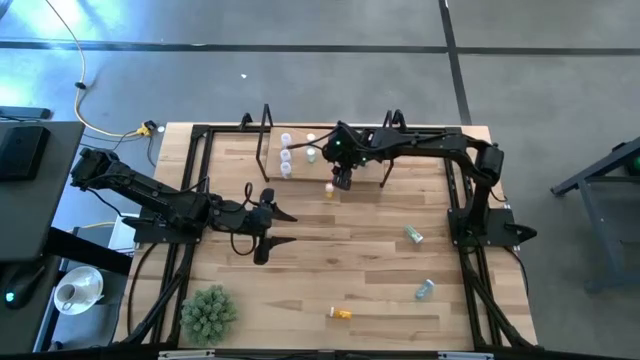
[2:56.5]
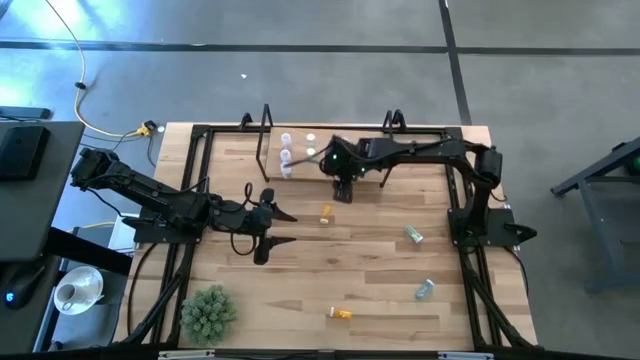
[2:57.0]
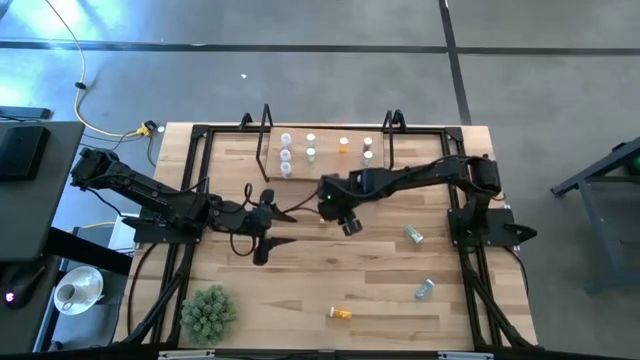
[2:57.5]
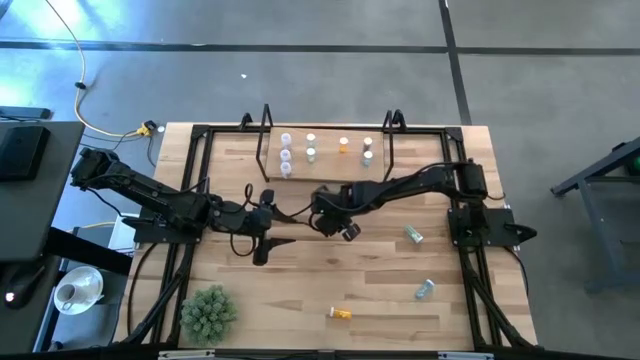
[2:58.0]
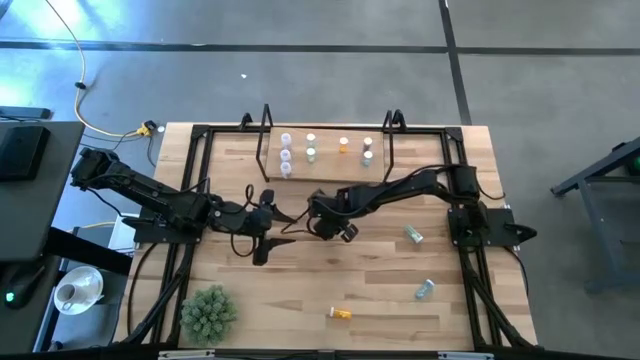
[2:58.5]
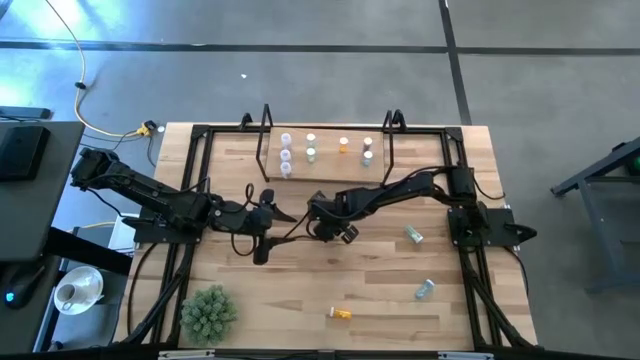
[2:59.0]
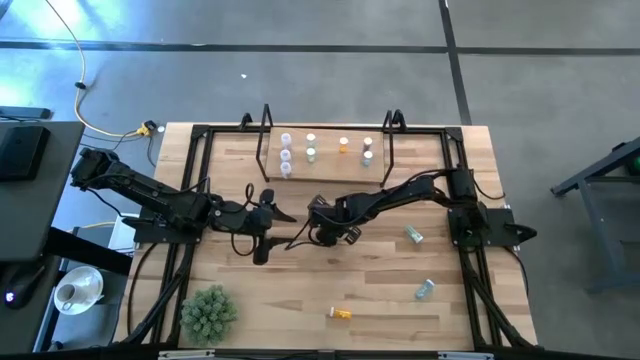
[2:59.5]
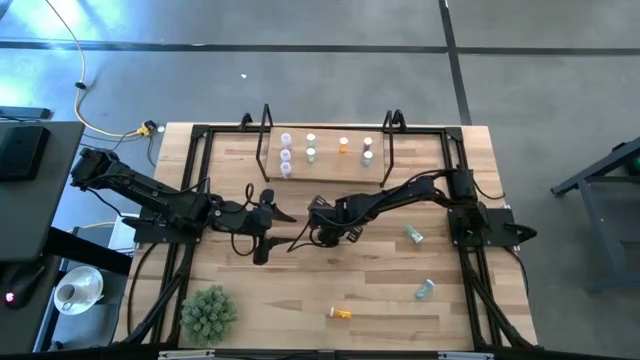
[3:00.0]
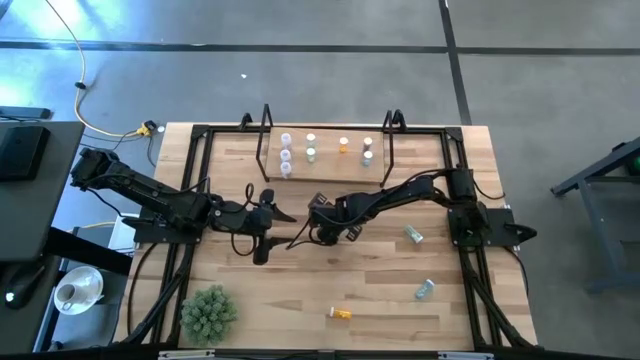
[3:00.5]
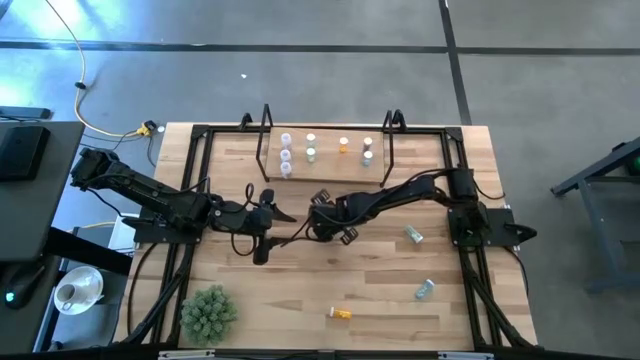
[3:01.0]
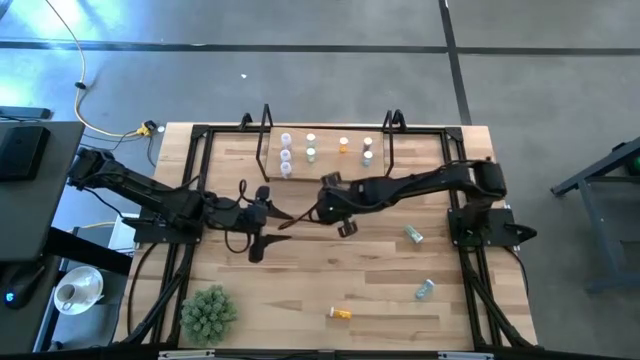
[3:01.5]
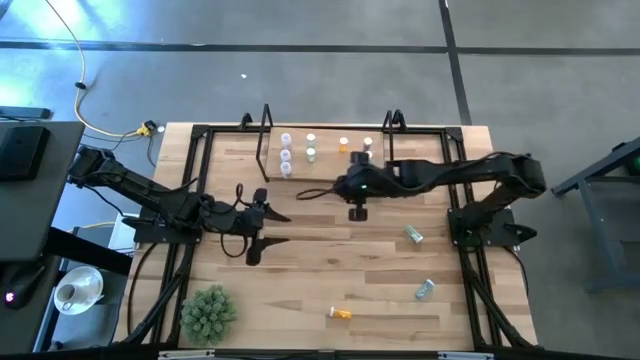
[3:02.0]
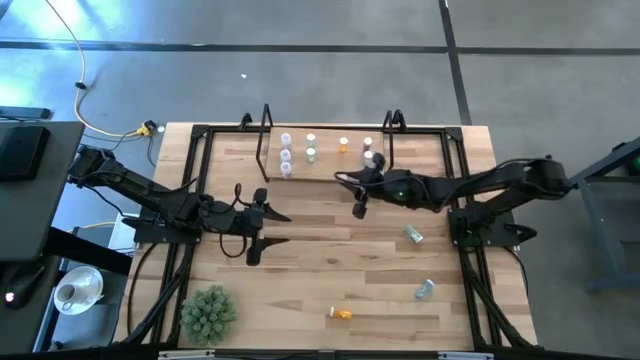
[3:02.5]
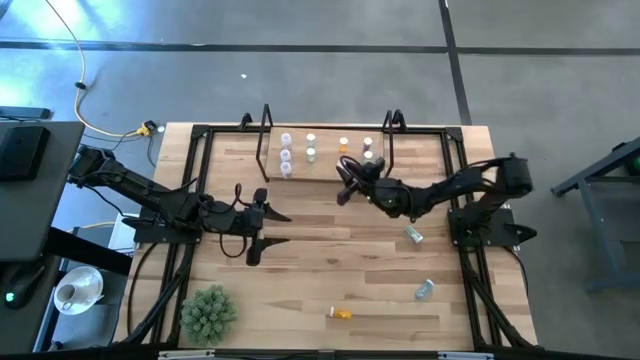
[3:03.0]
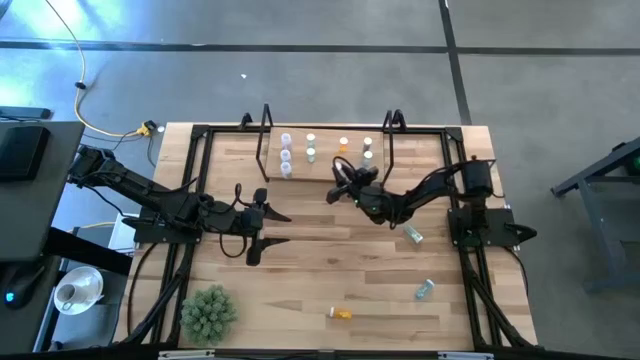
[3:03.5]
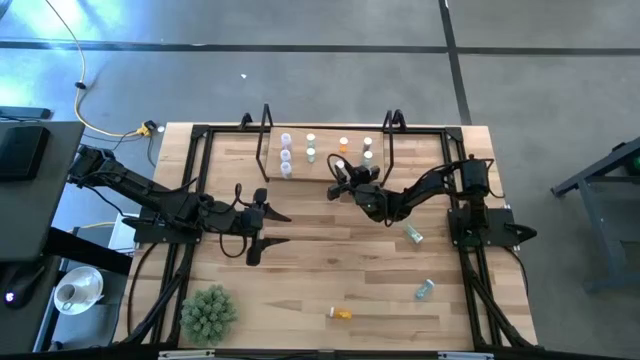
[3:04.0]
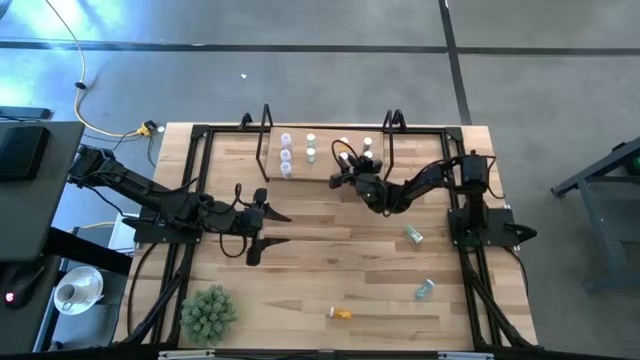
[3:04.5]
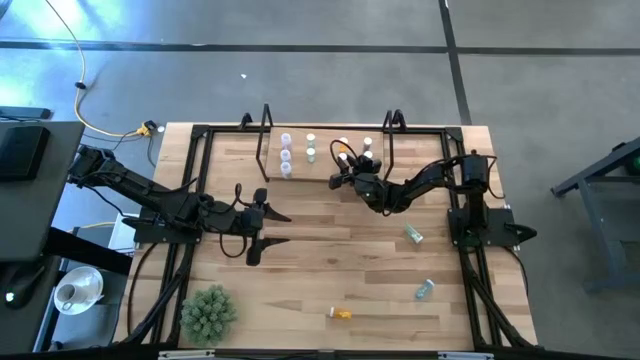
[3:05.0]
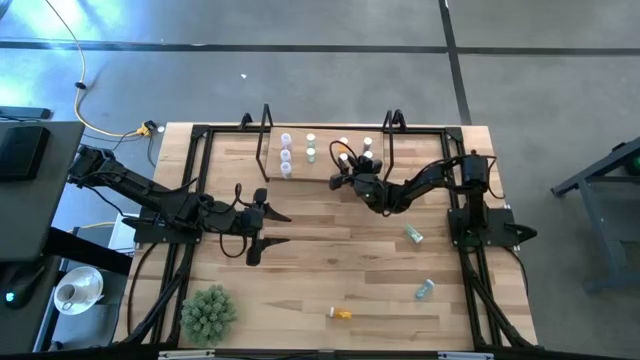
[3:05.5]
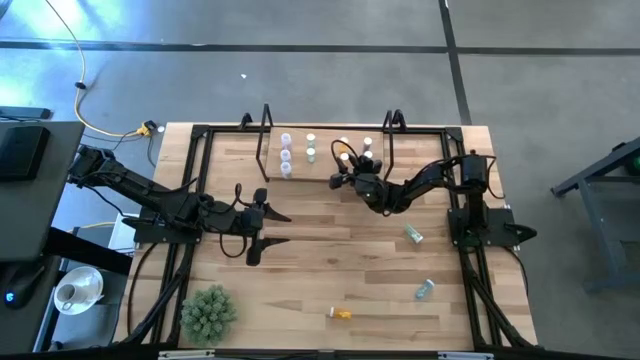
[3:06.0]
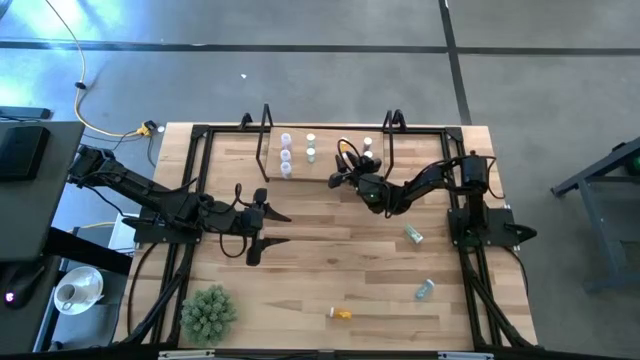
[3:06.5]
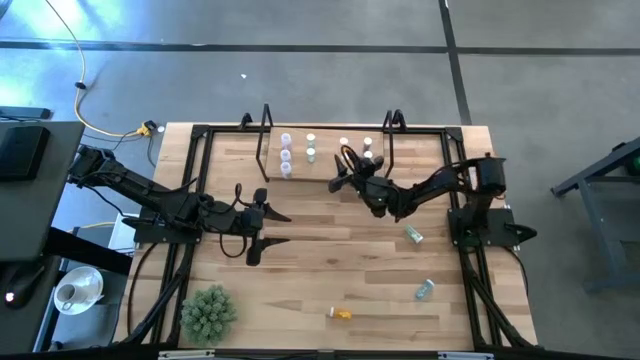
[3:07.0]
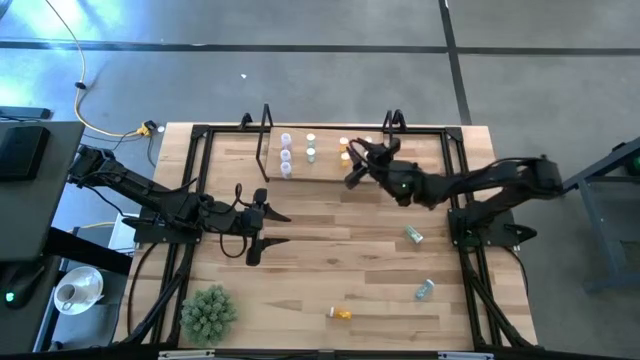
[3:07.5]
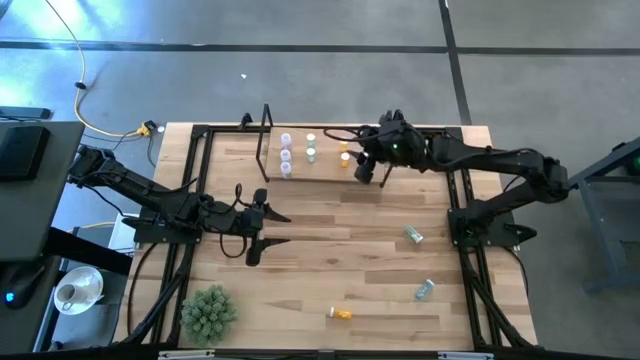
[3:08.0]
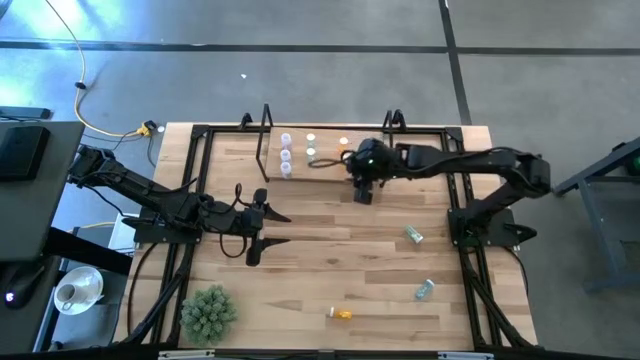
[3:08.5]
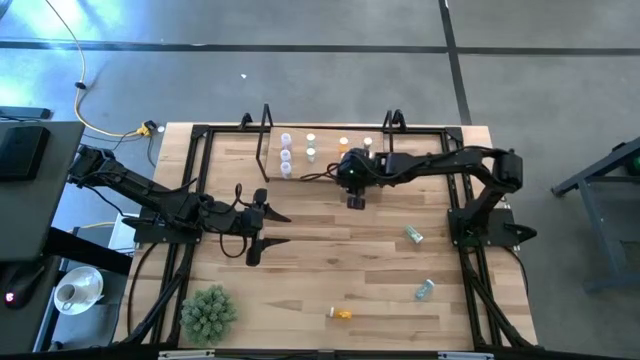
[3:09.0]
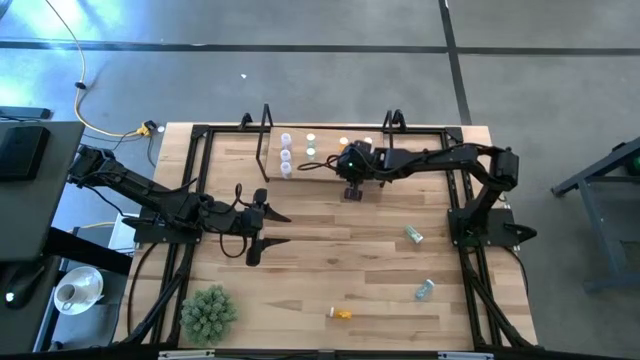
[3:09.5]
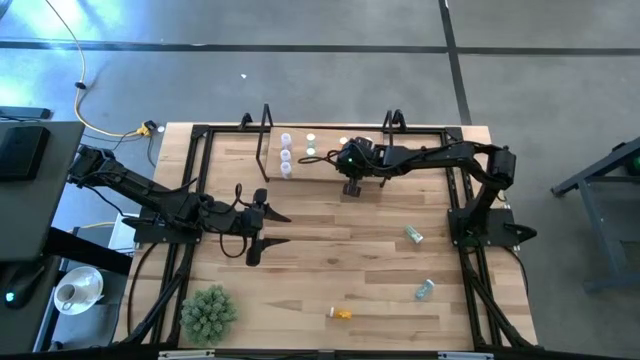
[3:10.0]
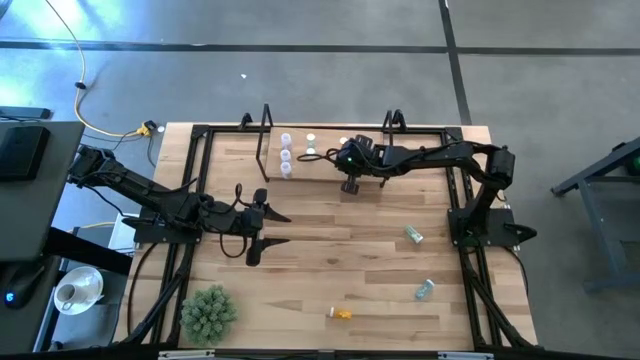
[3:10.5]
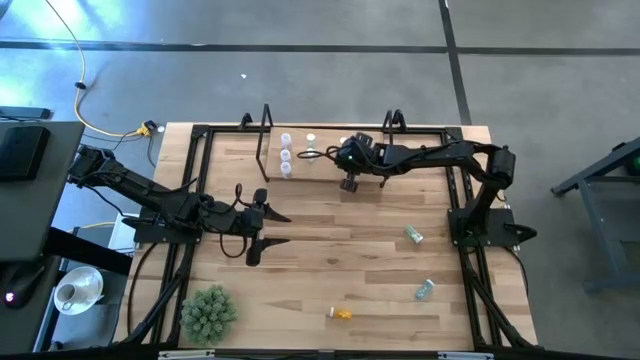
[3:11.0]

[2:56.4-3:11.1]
Task: Pick and place medicine bottles onto shelf by color
Put the top orange pill bottle on the shelf aligned with the other orange pill bottles

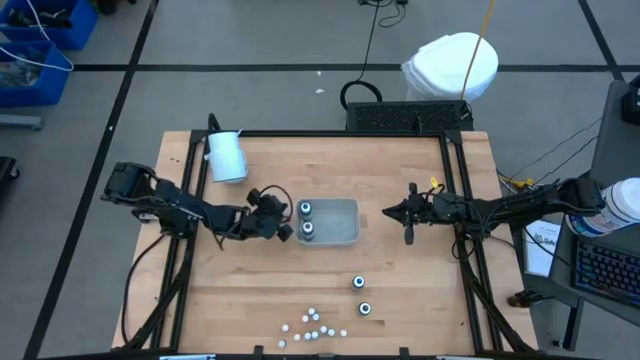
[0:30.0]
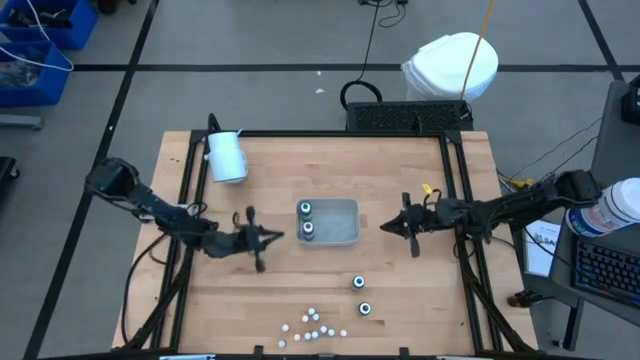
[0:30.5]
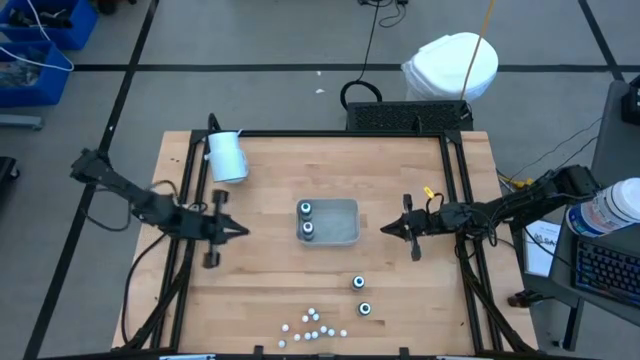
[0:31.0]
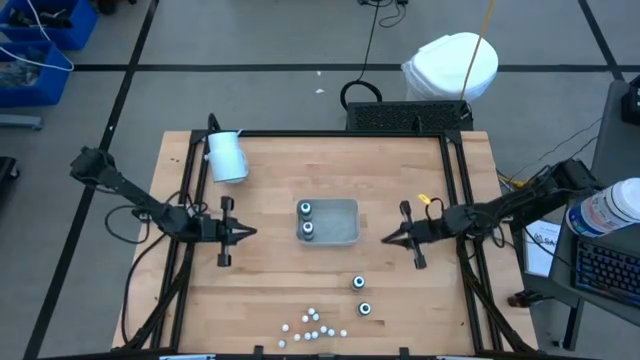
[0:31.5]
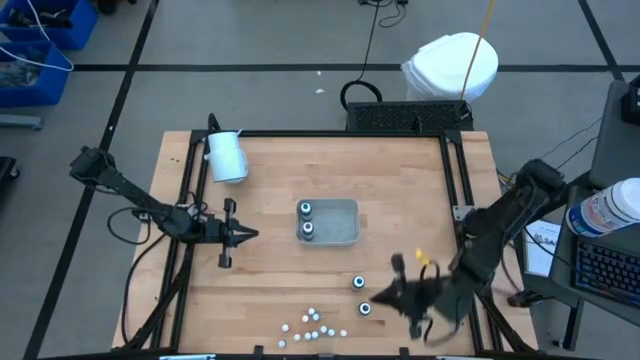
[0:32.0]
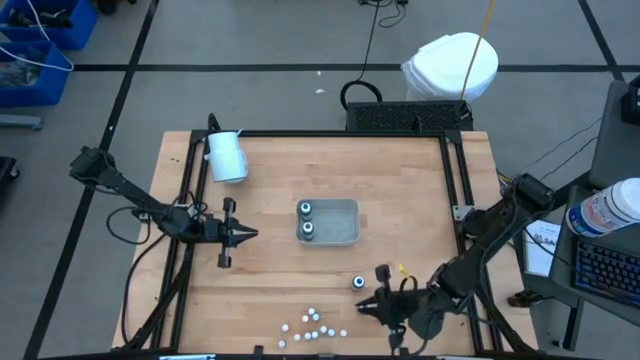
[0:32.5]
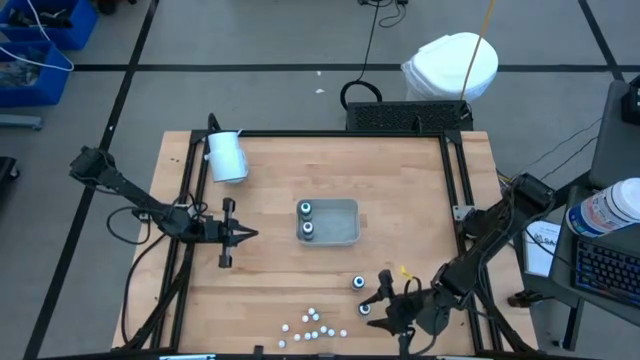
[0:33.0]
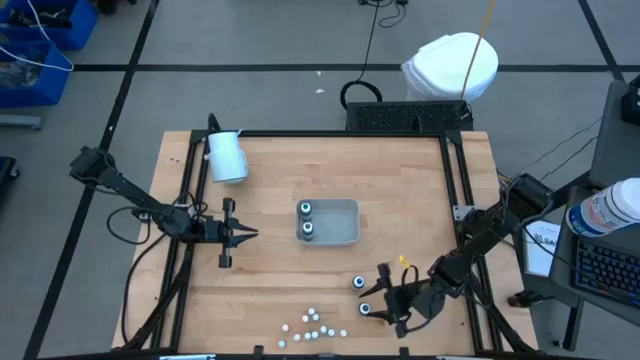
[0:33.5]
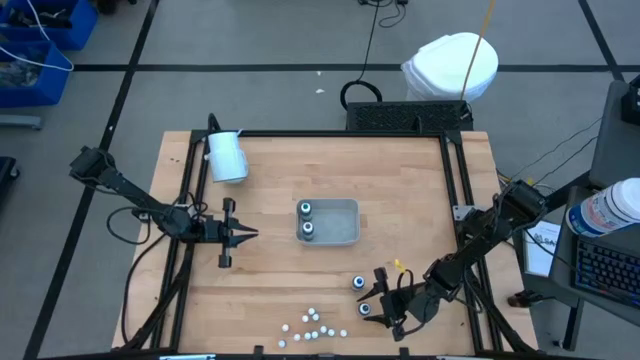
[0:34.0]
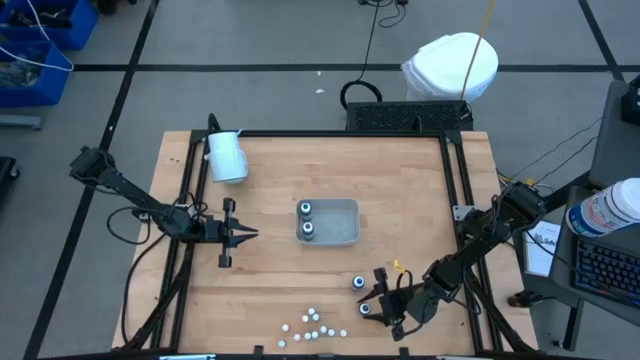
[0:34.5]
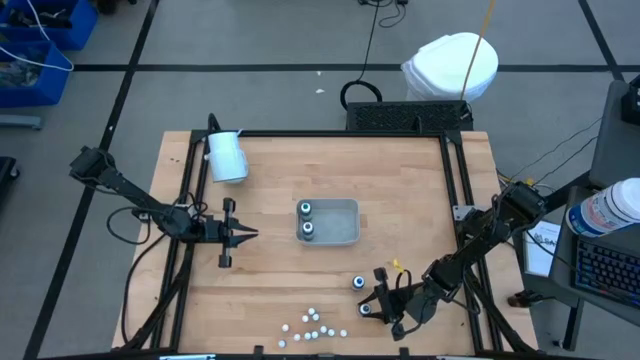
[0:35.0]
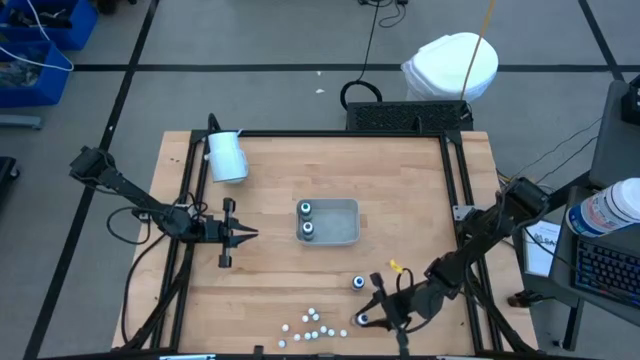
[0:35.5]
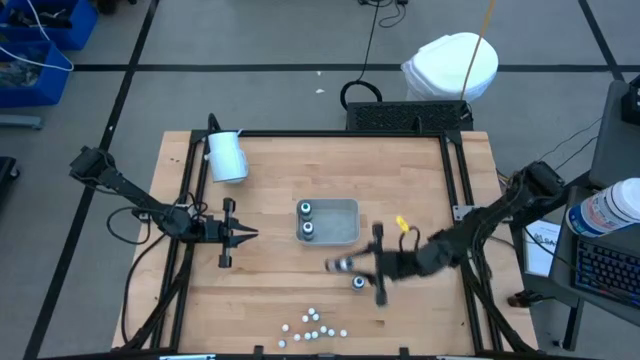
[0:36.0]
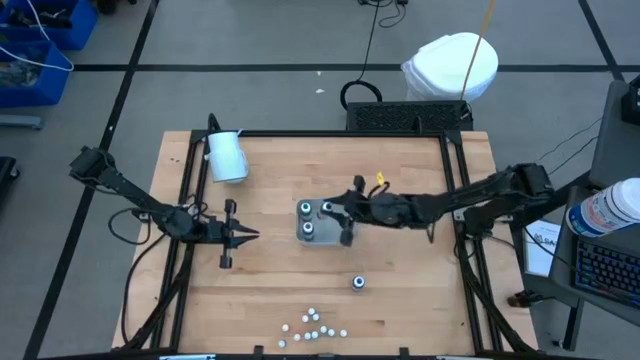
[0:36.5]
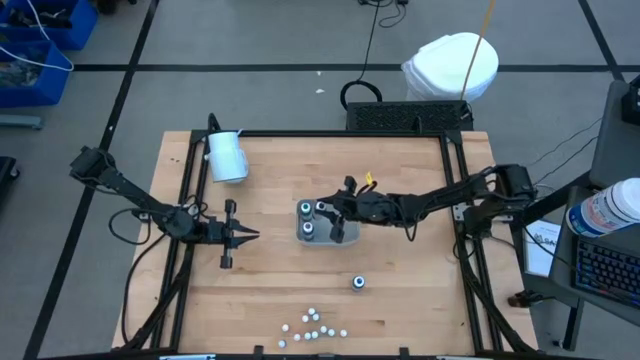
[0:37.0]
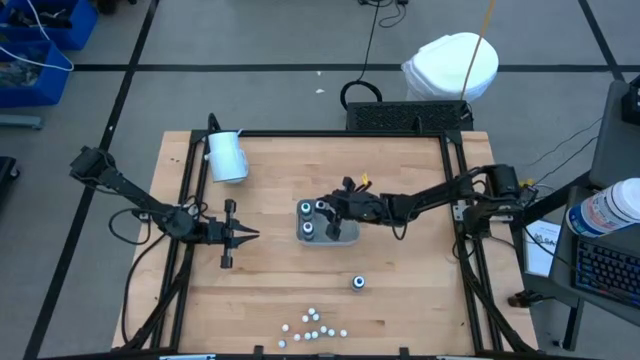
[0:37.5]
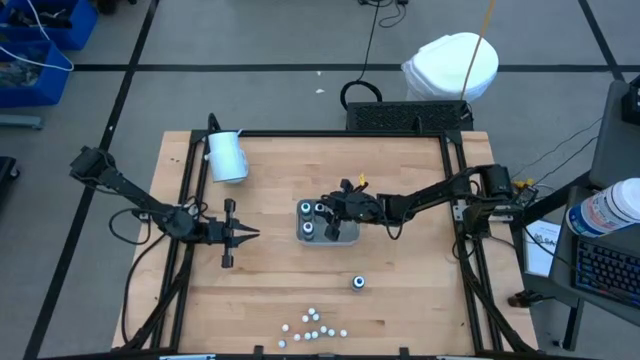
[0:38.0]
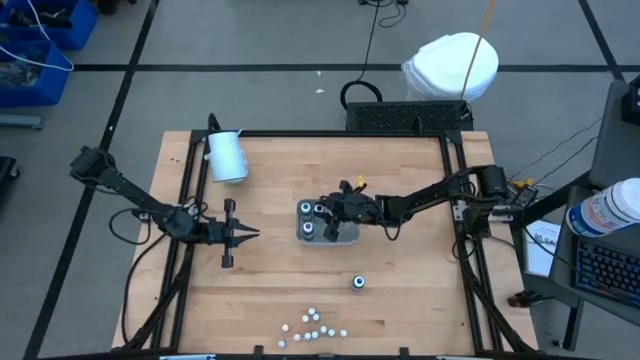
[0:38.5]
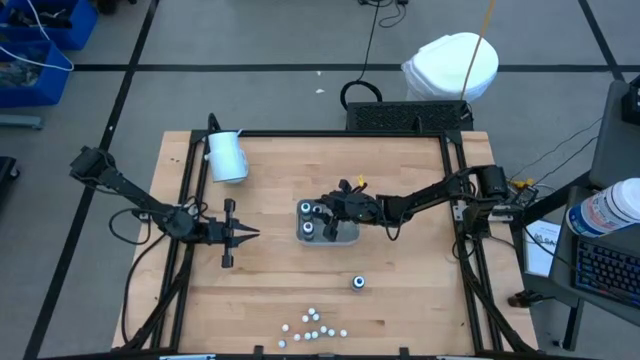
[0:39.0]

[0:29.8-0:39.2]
Task: Pick & Place food coloring
Put the large black food coloring bottle into the gray bin
